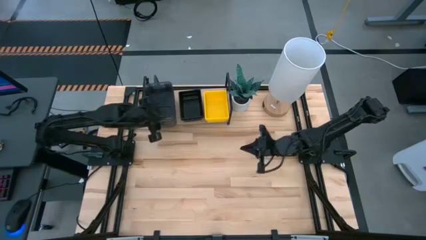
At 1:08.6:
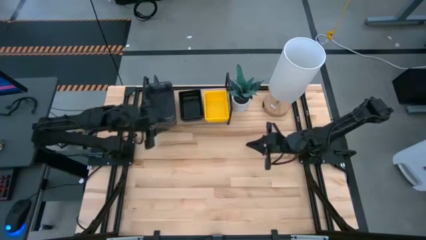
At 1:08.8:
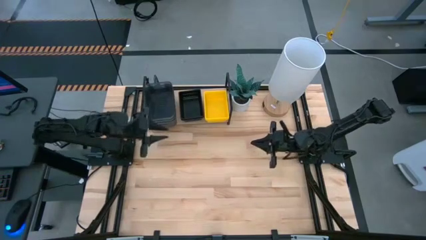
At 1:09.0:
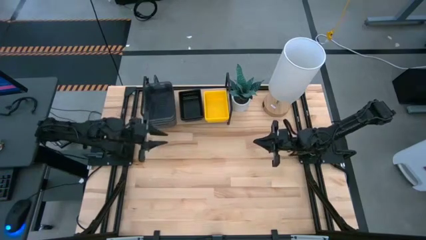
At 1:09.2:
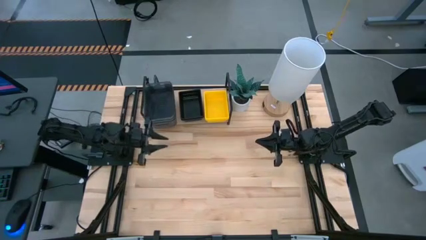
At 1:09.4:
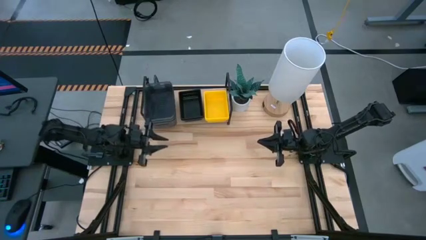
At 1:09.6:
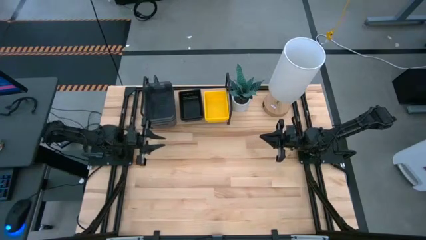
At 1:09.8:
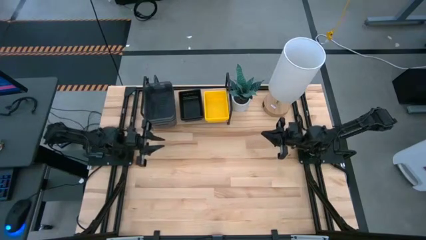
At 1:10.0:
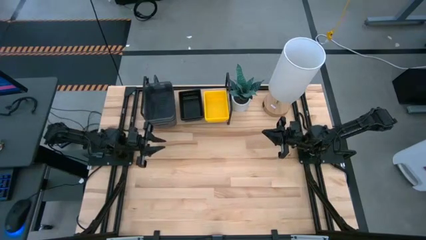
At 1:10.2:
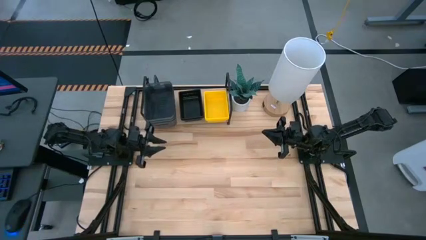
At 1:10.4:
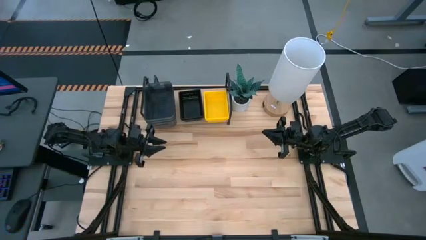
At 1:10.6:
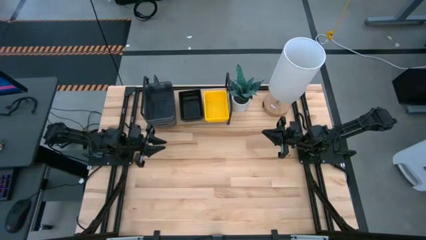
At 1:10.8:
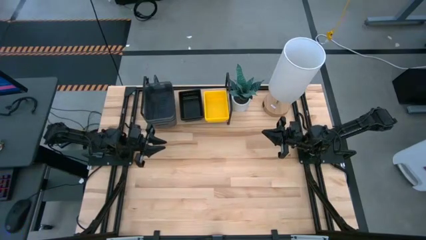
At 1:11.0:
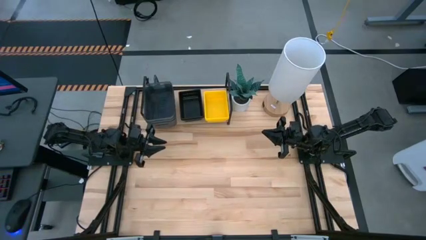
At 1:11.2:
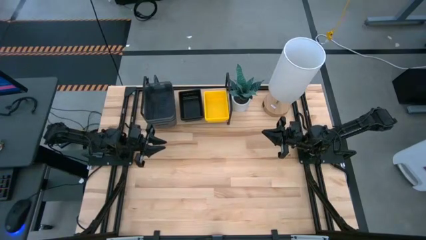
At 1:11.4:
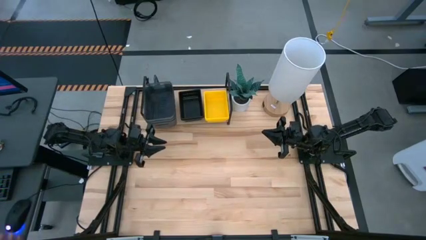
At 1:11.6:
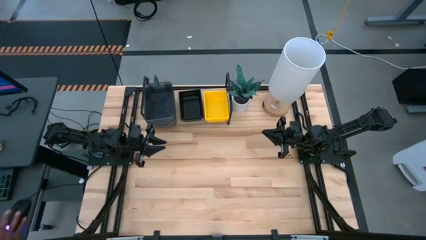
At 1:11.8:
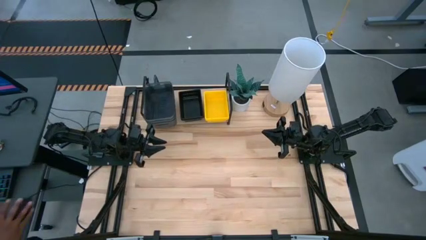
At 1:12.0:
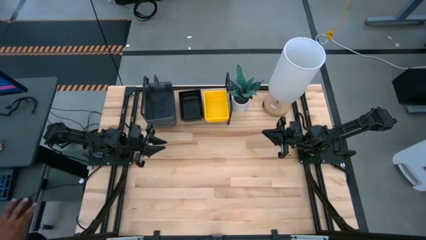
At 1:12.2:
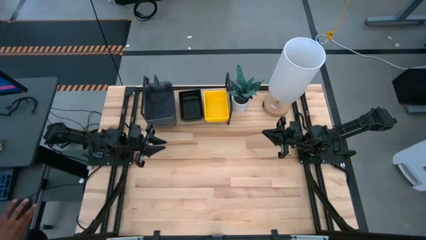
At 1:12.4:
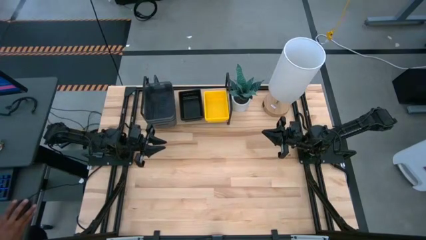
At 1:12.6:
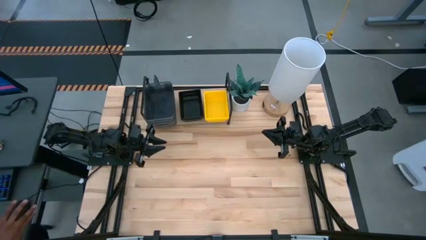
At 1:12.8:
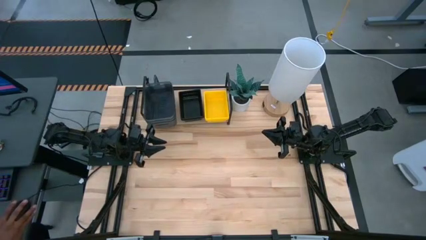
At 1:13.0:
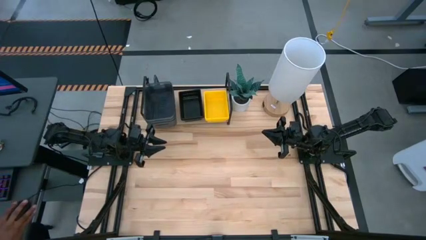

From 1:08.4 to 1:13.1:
Task: Stack baskets on shelf by color
Return to home position

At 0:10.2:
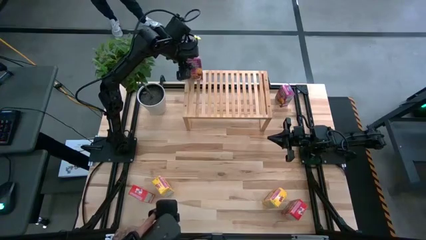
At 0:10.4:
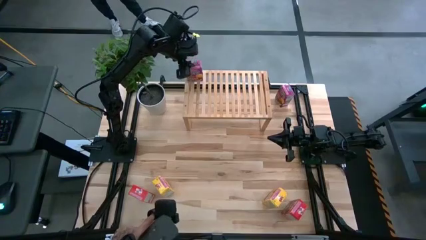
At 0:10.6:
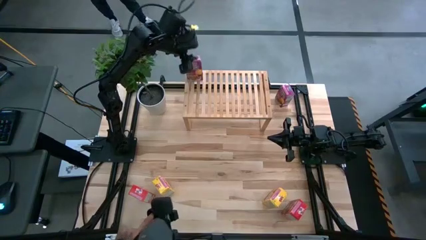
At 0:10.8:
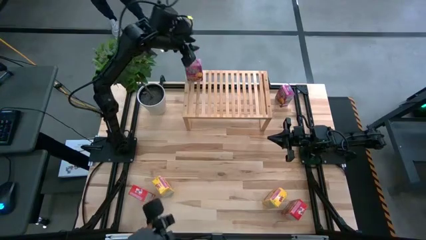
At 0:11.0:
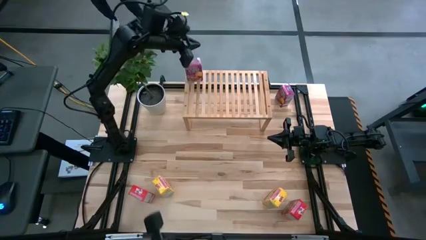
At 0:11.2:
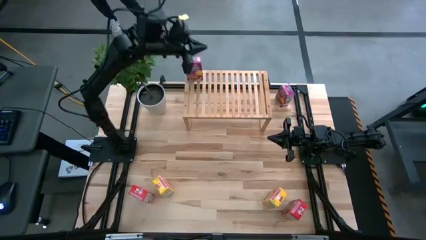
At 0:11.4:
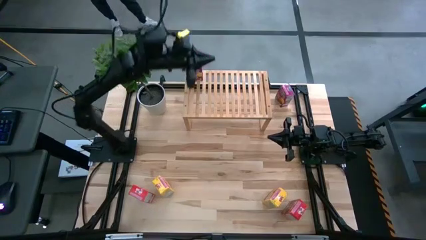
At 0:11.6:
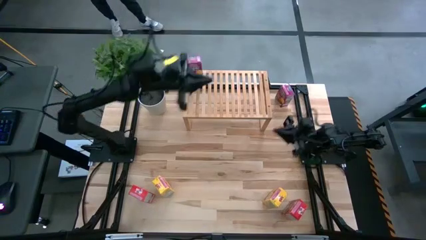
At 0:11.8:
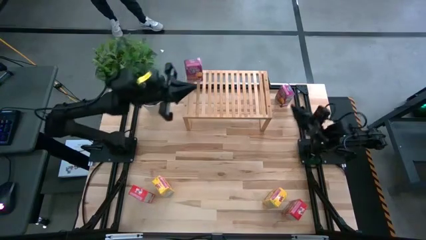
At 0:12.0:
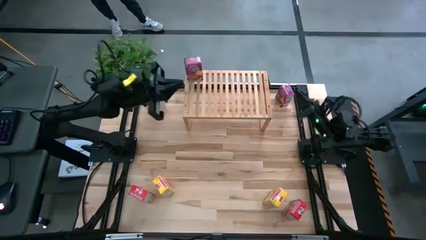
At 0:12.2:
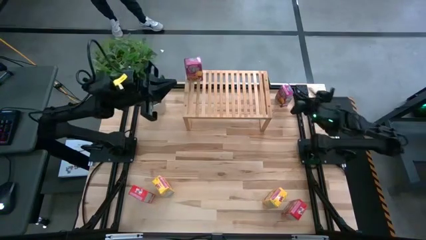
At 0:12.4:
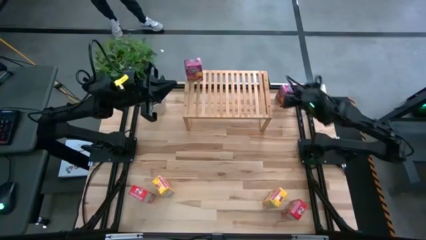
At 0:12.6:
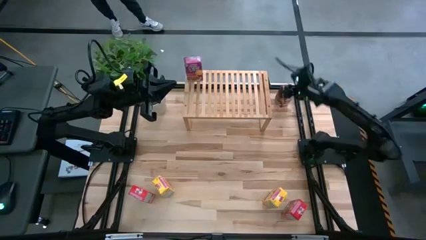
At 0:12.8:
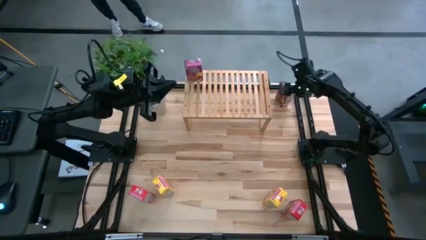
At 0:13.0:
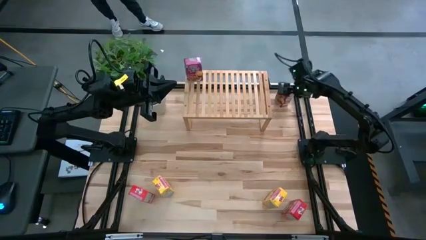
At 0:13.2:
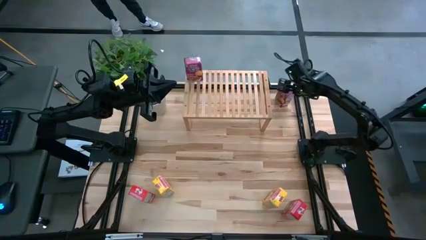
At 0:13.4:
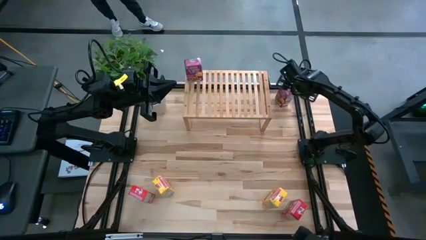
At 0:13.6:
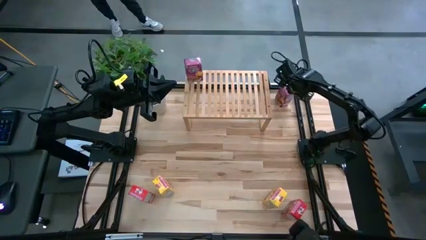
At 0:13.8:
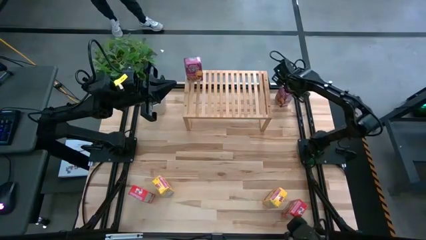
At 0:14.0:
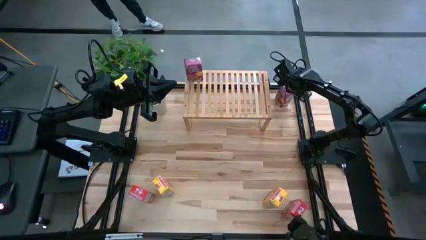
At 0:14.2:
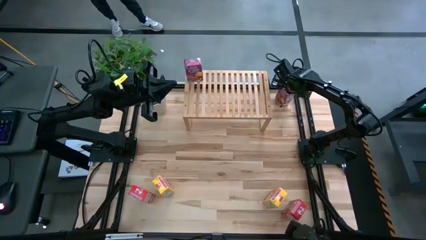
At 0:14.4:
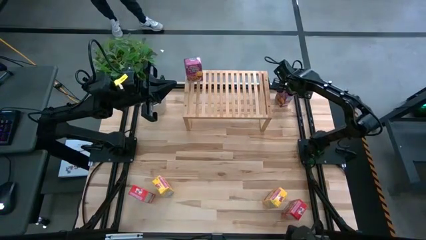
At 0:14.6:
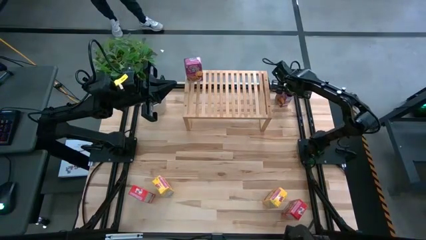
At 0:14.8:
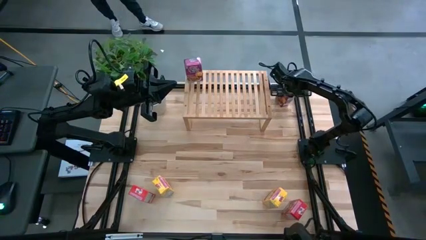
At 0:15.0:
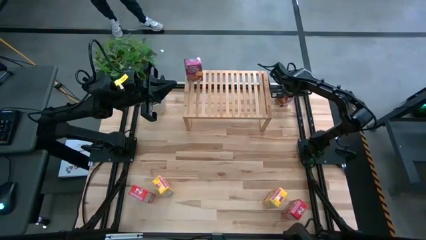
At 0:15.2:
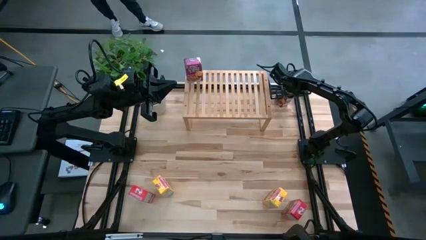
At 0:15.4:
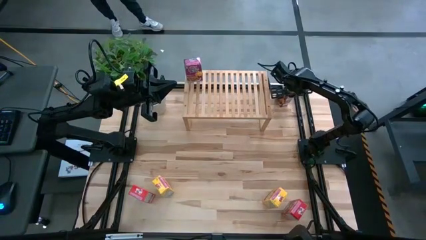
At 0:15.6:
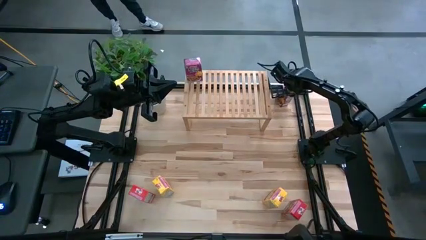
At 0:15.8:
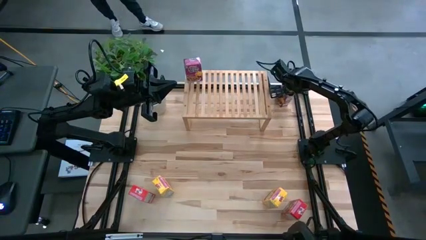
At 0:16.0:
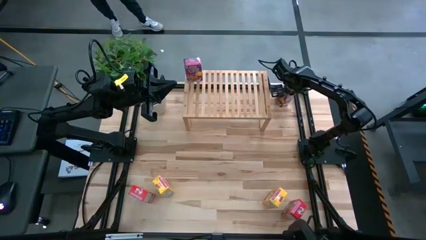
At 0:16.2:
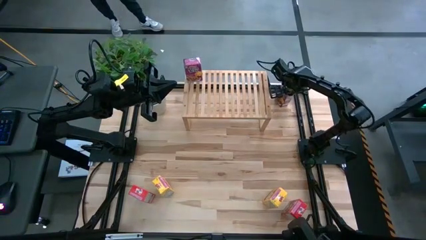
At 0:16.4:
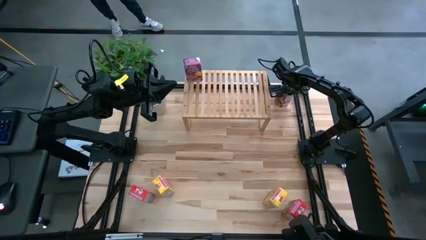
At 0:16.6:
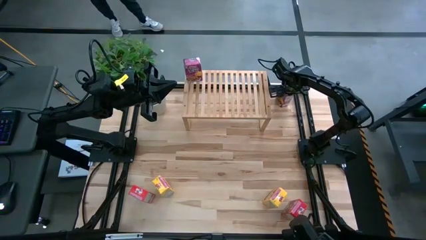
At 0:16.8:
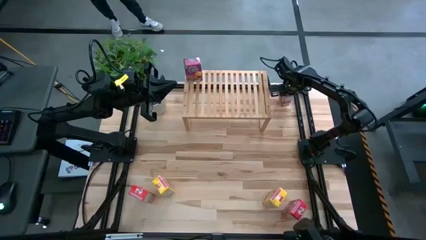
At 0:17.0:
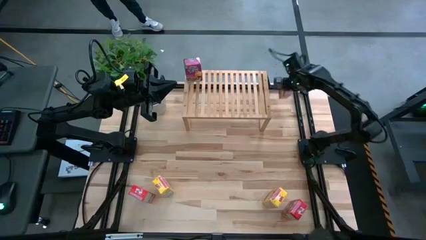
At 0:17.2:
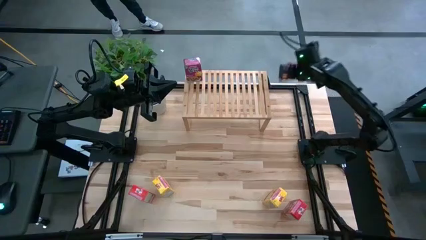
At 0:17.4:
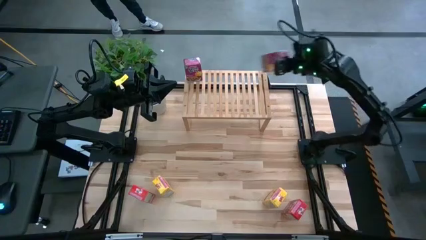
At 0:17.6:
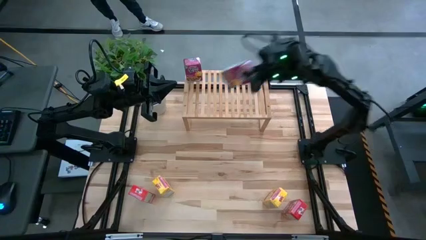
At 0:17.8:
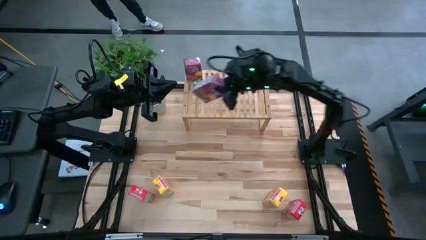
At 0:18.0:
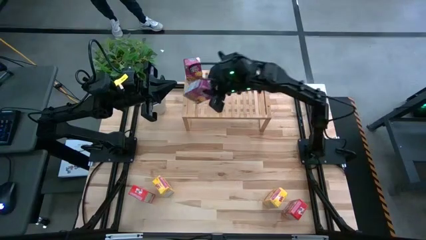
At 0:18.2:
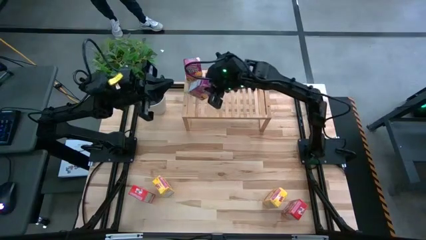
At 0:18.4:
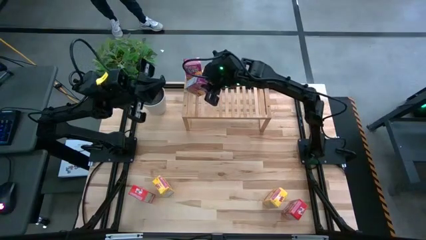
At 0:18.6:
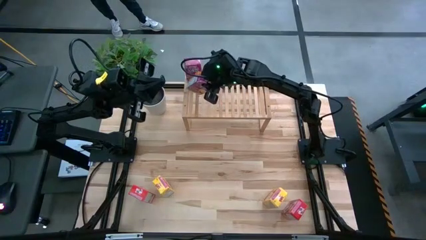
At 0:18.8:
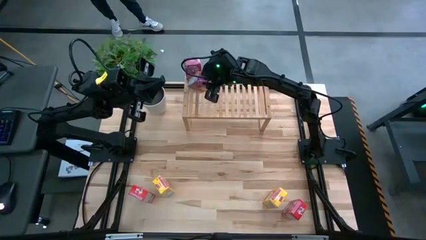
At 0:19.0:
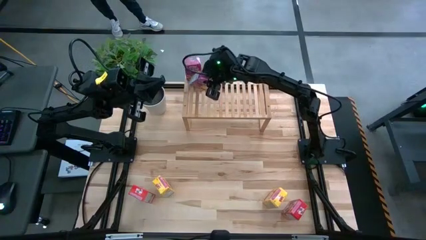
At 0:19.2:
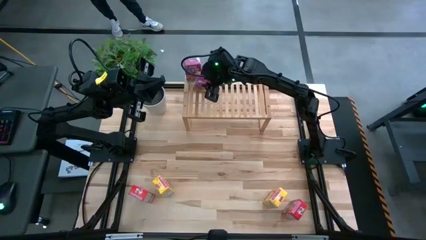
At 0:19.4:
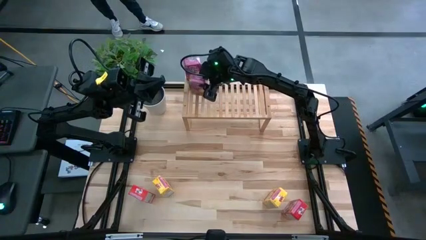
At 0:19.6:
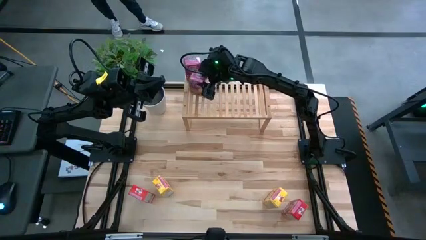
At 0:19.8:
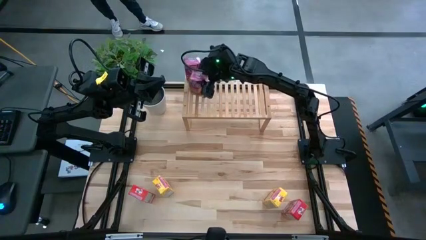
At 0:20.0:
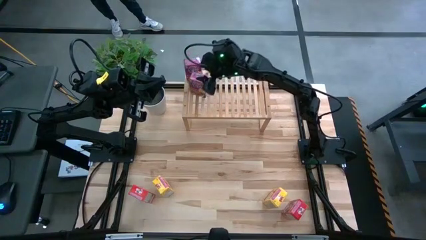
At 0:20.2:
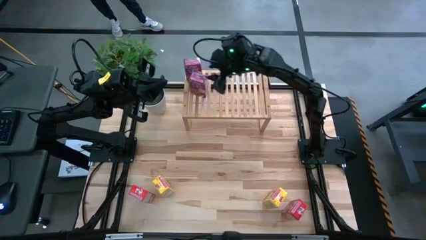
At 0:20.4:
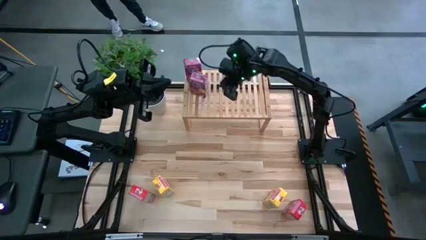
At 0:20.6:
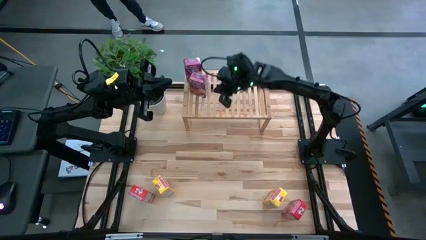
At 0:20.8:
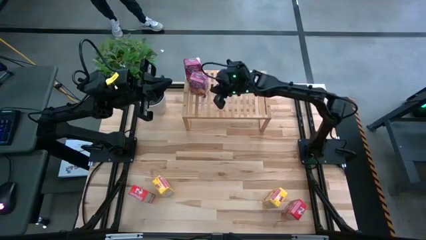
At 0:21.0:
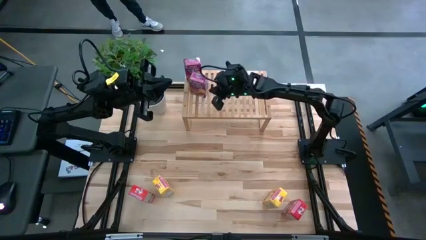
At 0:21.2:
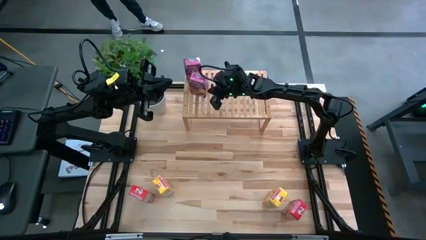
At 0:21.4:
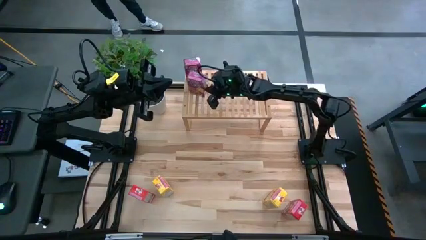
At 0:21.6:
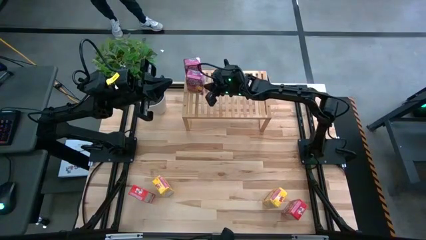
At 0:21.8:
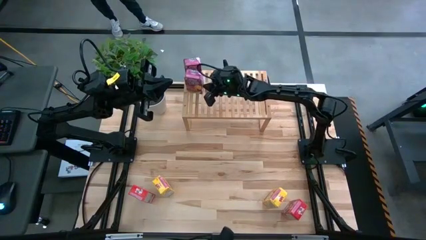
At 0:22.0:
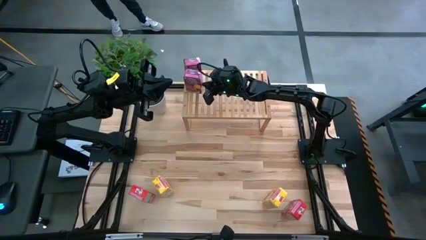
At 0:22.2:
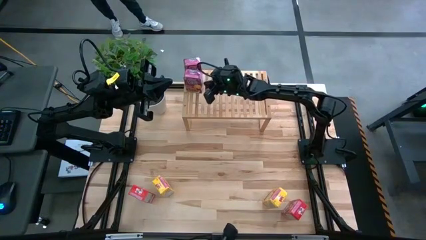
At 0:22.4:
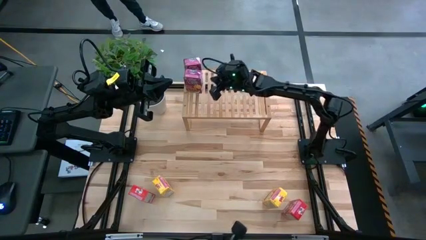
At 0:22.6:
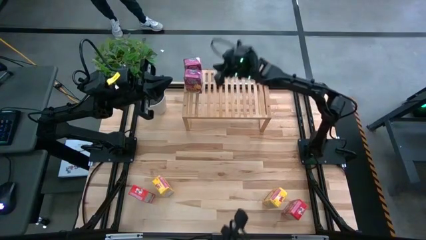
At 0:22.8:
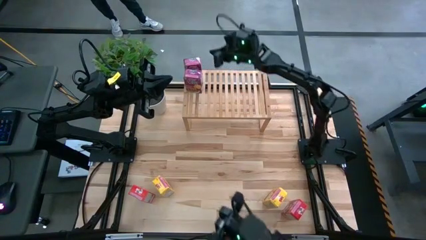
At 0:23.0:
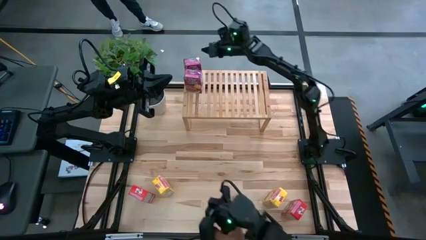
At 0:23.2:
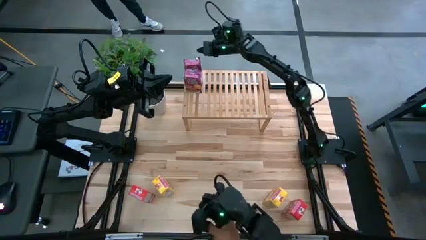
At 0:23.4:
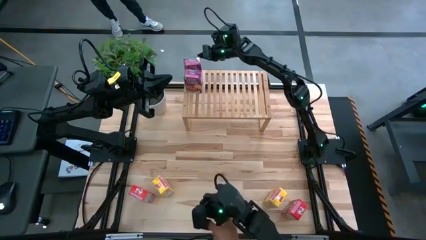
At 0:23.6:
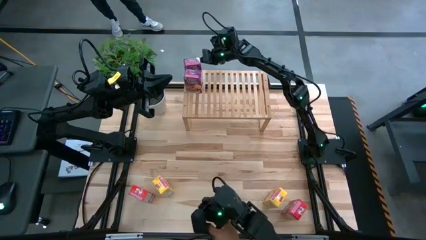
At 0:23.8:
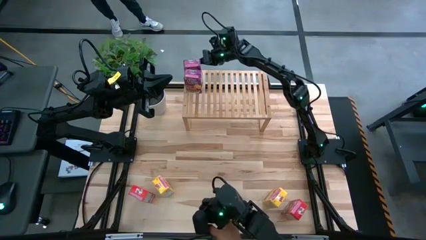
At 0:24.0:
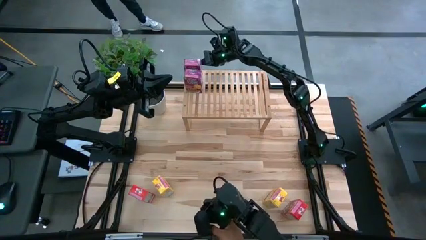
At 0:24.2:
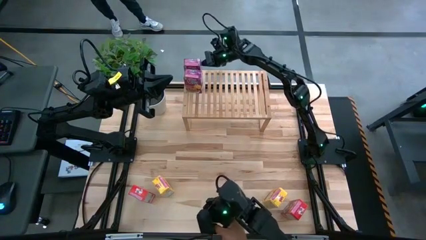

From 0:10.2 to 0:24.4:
Task: Stack cereal on shelf
Put the violet cereal box aligned with the other violet cereal box on the shelf
